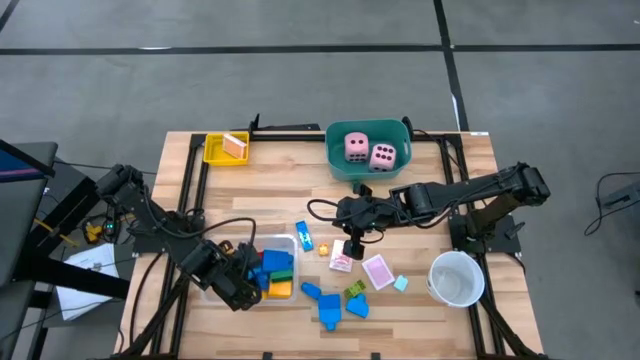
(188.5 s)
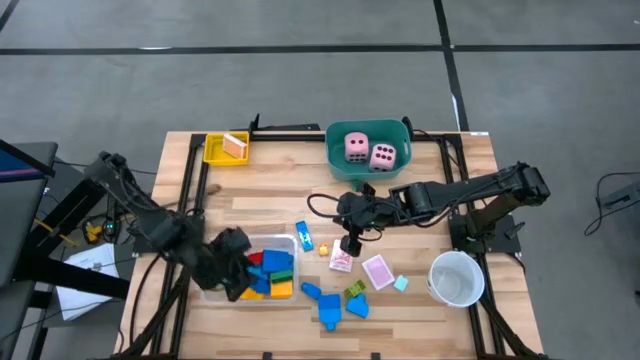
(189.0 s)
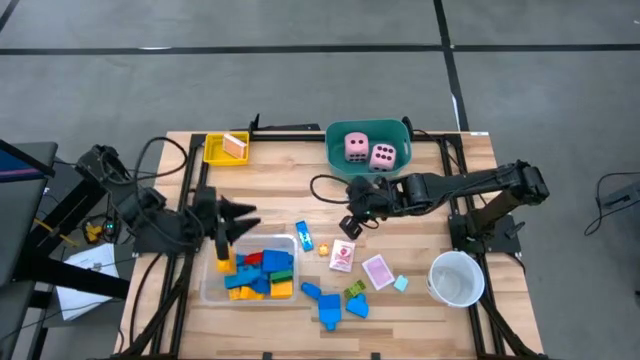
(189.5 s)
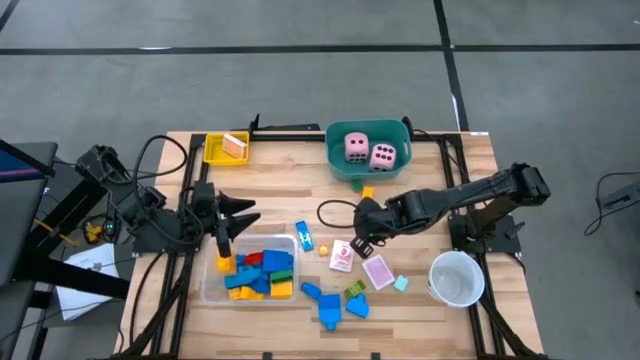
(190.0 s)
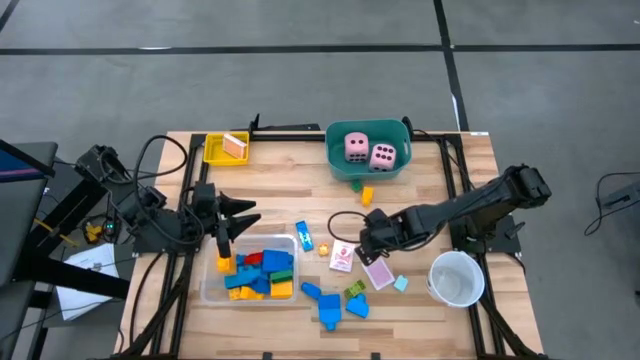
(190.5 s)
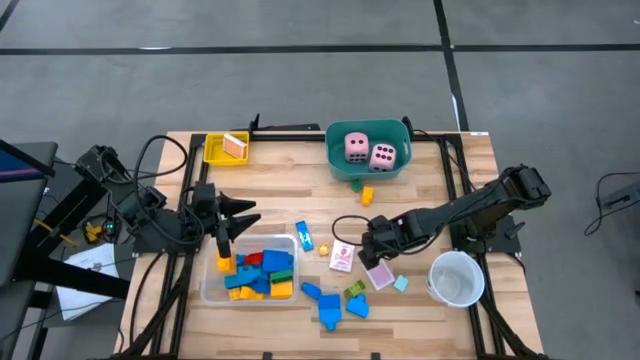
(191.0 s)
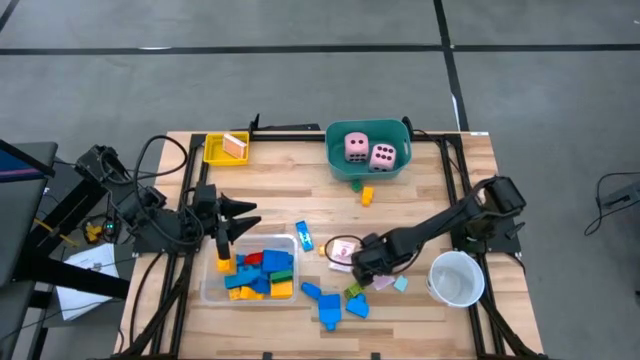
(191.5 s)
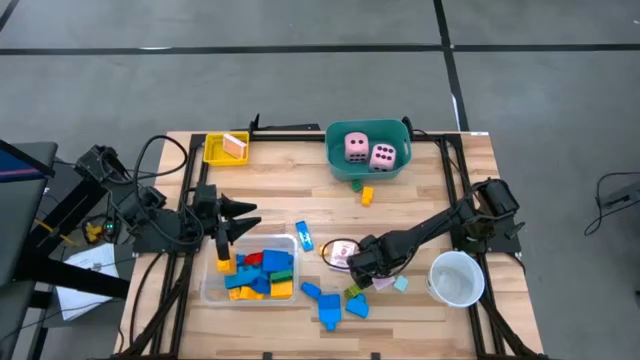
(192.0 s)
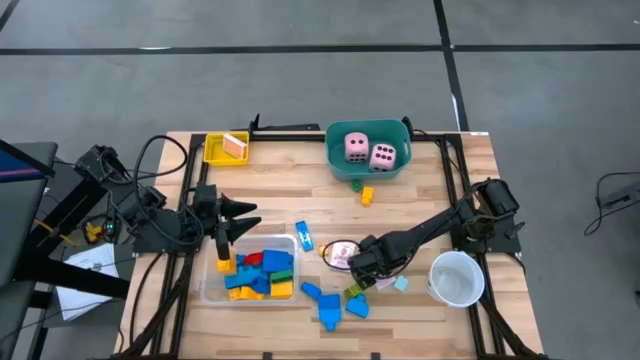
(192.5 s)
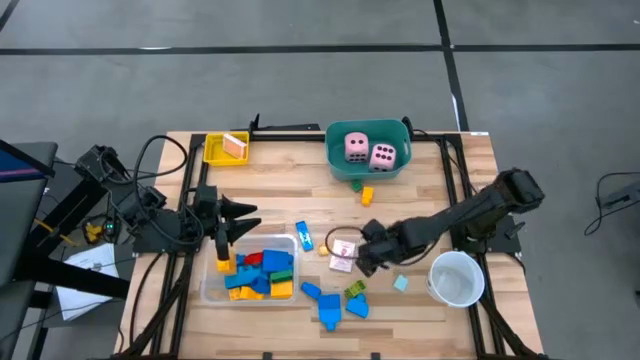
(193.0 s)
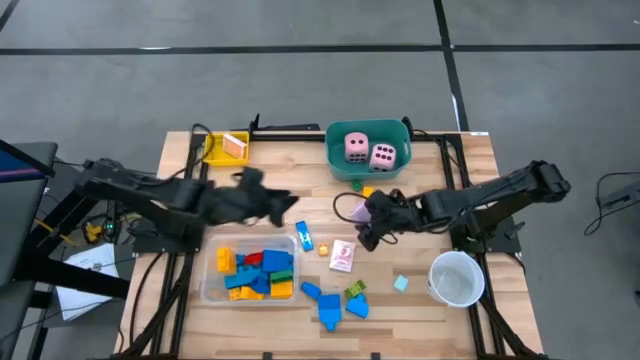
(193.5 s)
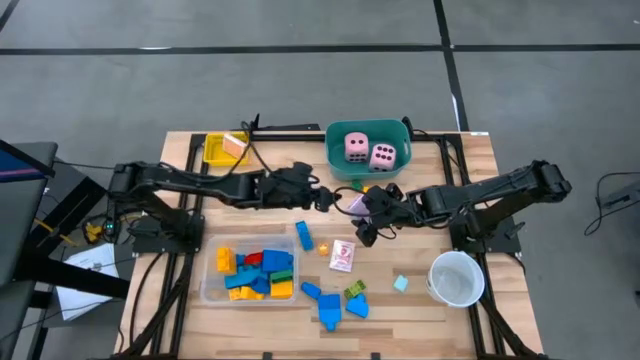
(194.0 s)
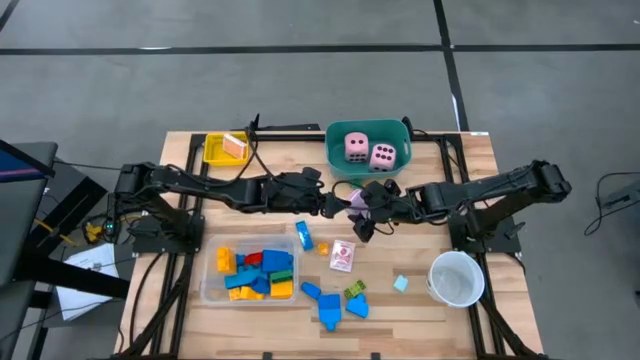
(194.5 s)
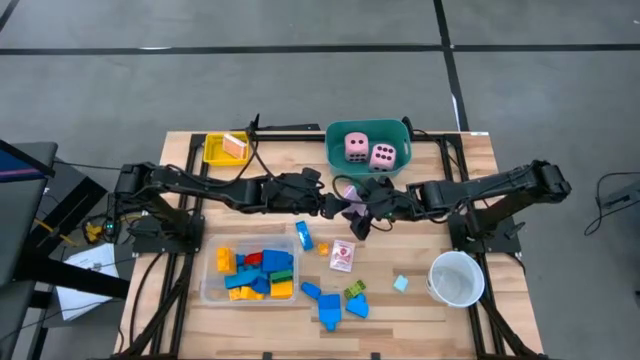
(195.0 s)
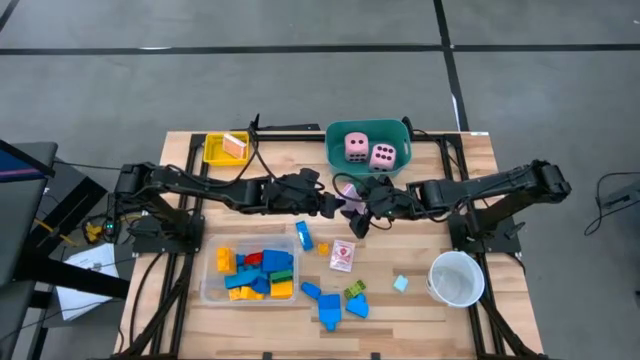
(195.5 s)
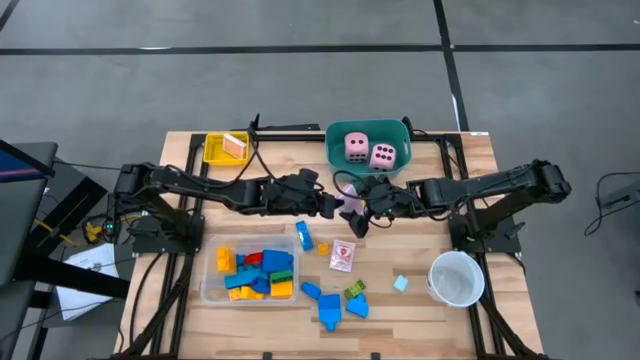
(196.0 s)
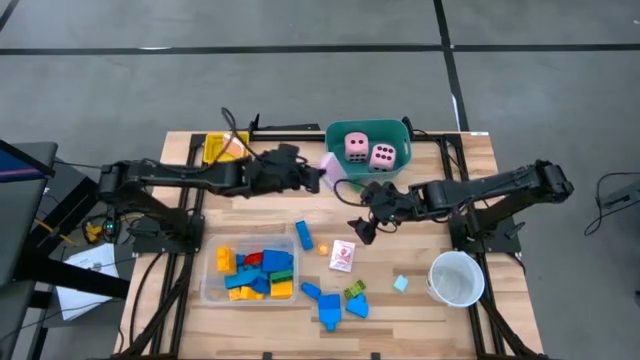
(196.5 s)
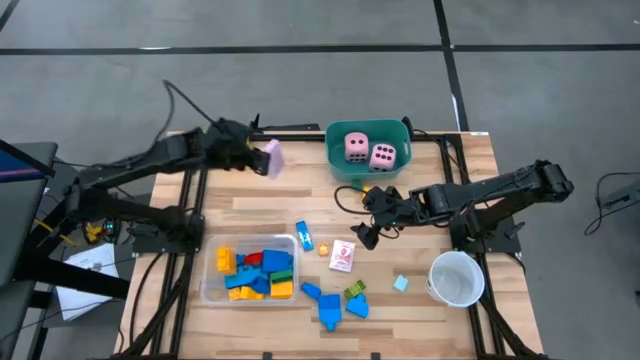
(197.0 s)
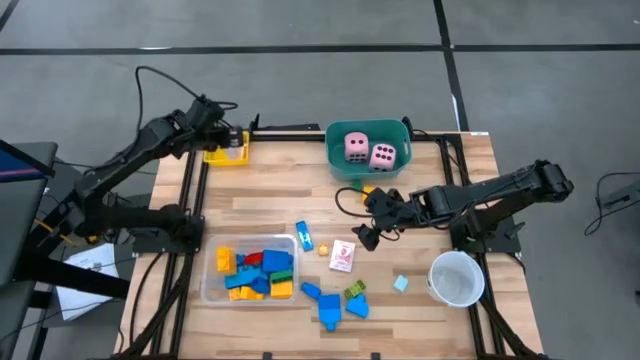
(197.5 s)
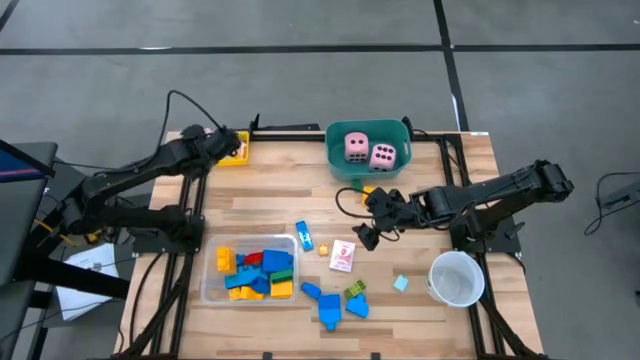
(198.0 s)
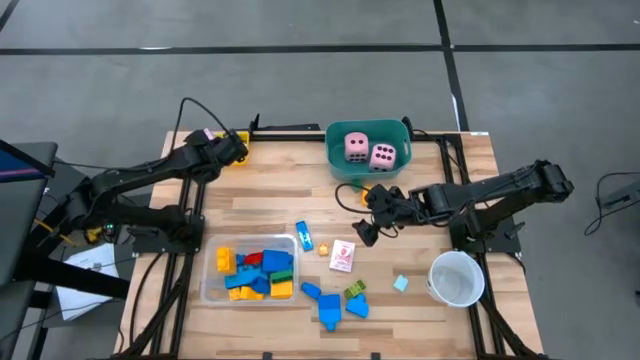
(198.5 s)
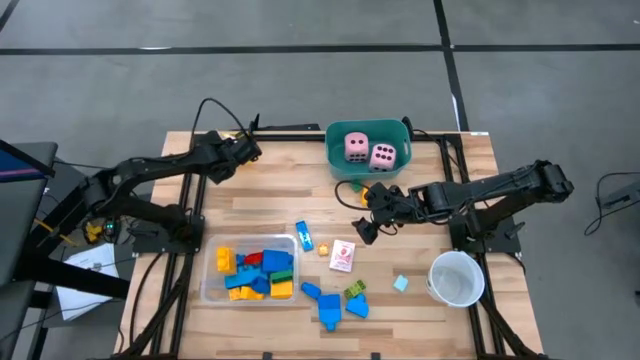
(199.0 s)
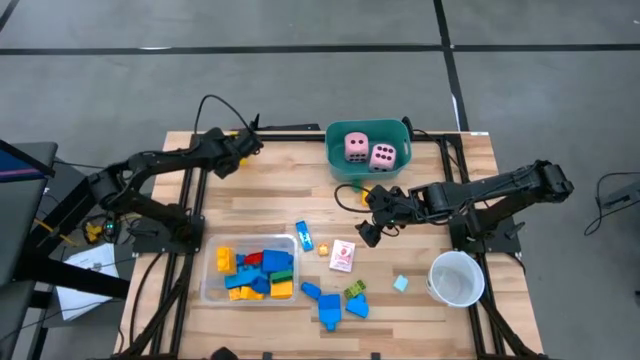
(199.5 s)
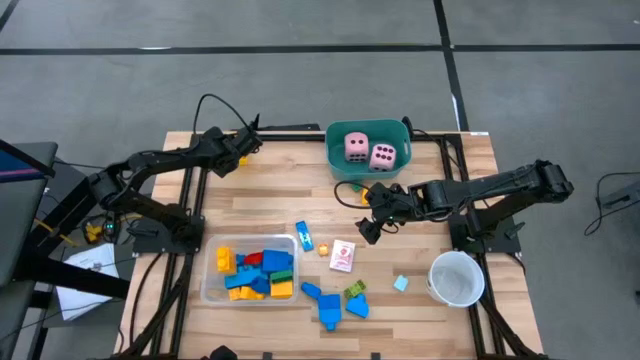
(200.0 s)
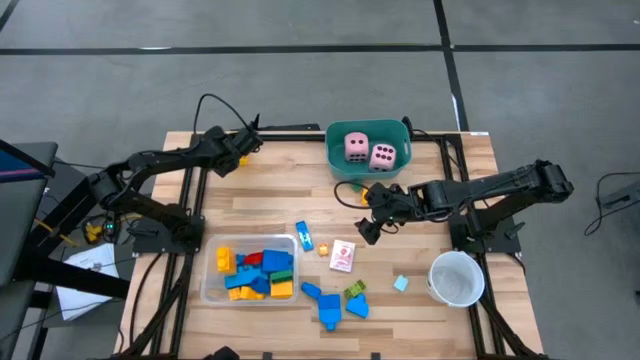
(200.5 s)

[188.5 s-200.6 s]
Task: Pick & Place Toys
Put the pink playing card into the yellow bin

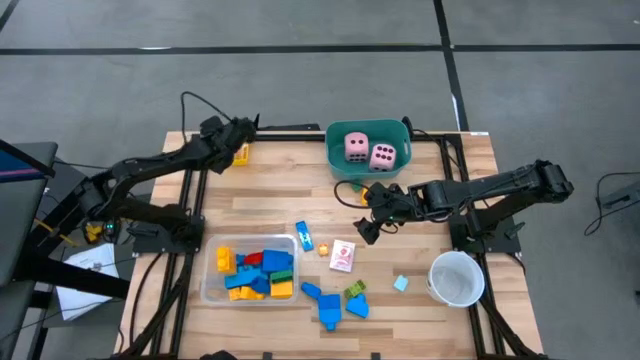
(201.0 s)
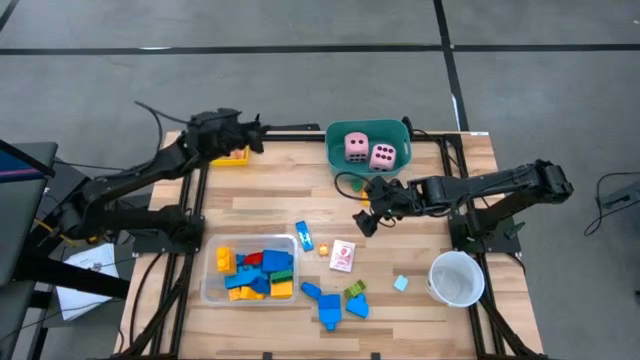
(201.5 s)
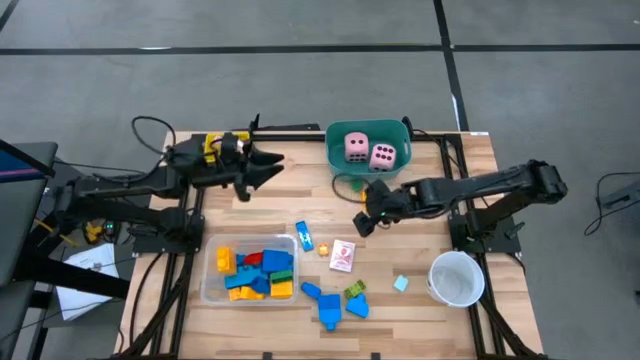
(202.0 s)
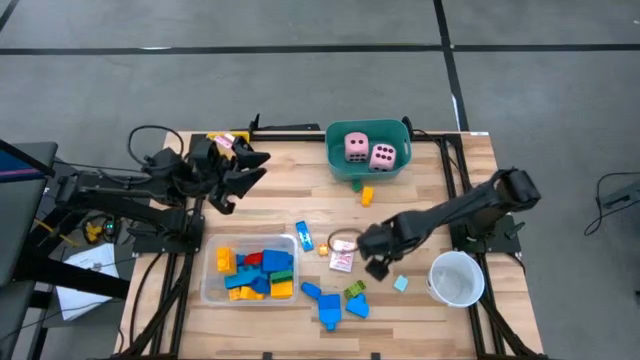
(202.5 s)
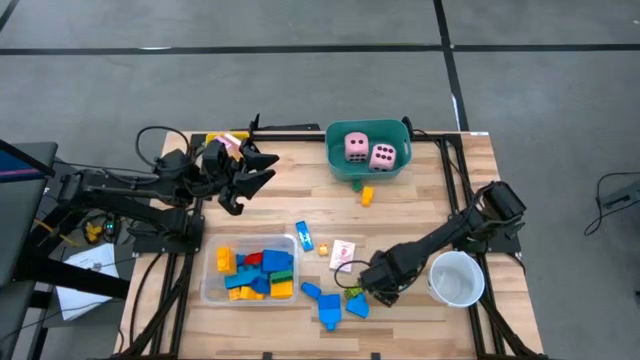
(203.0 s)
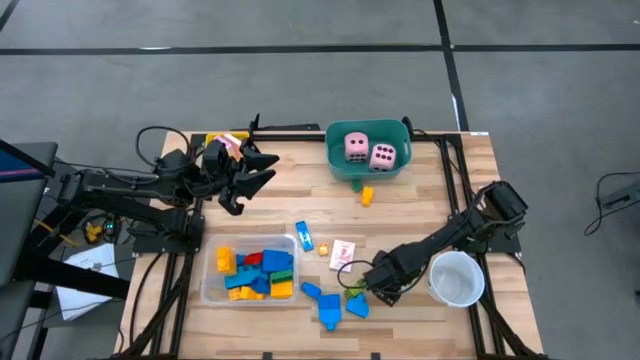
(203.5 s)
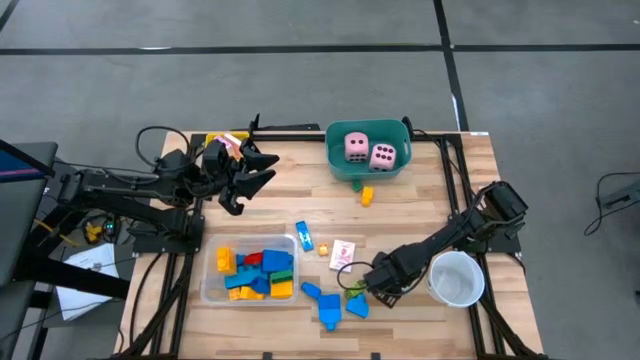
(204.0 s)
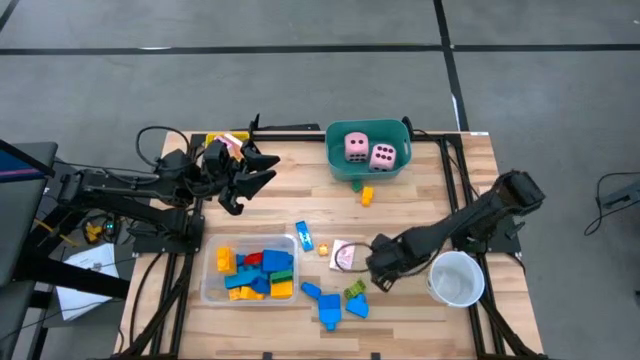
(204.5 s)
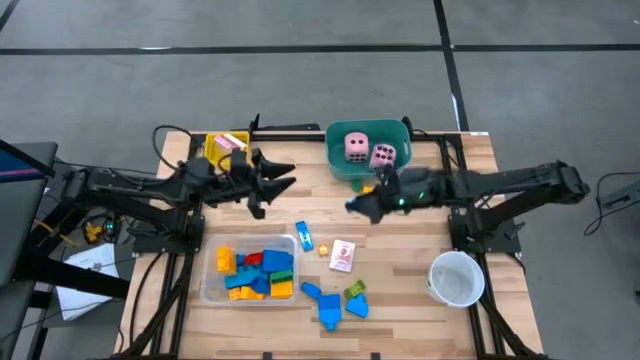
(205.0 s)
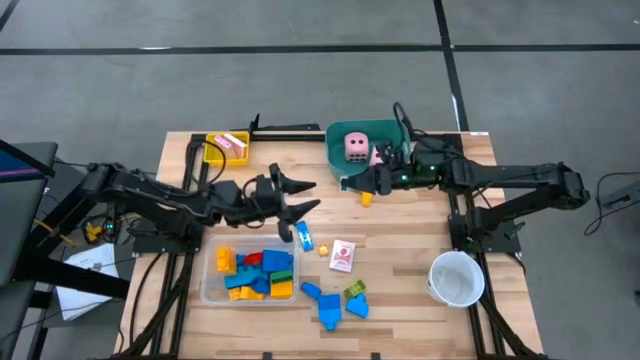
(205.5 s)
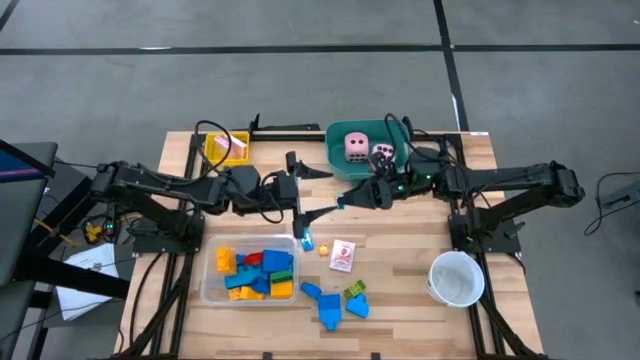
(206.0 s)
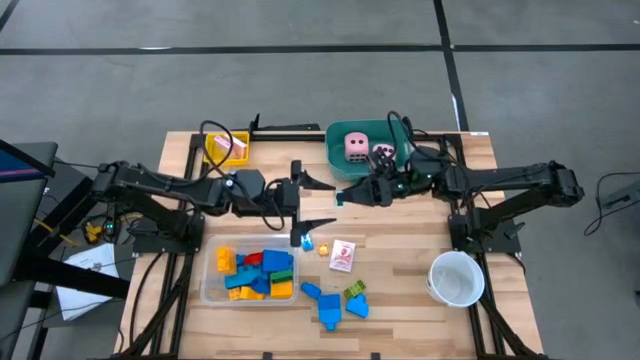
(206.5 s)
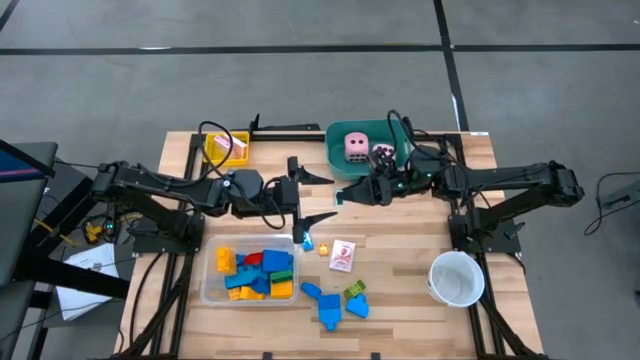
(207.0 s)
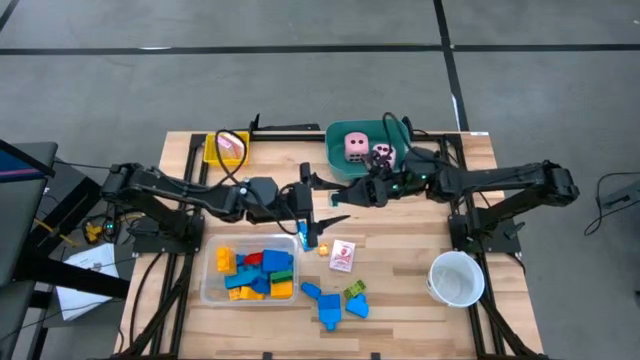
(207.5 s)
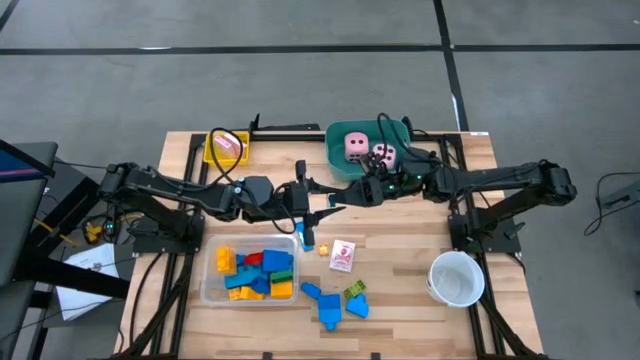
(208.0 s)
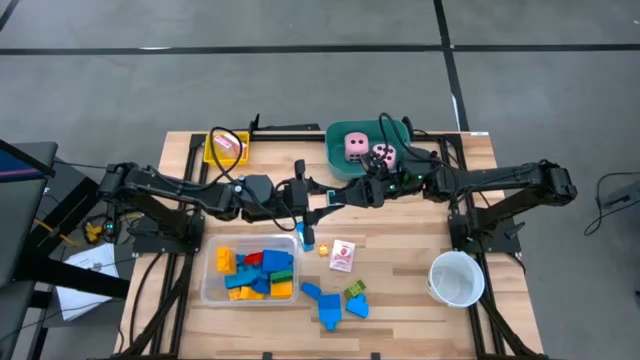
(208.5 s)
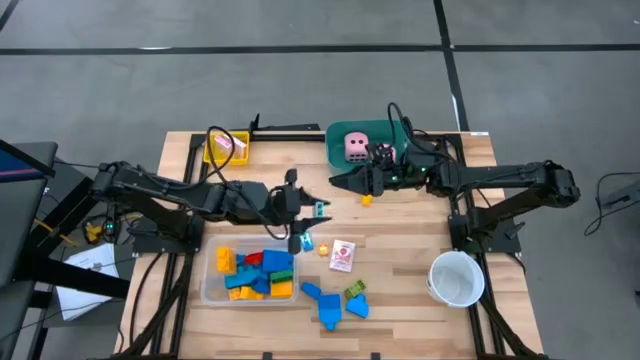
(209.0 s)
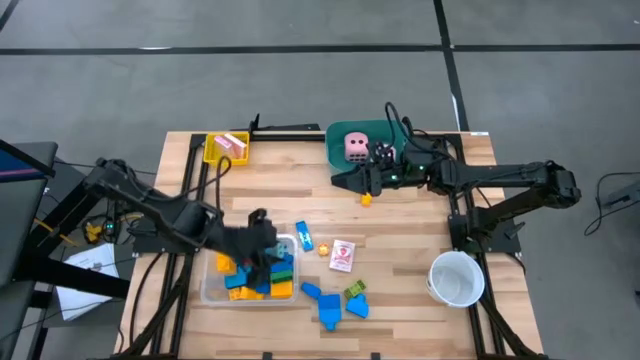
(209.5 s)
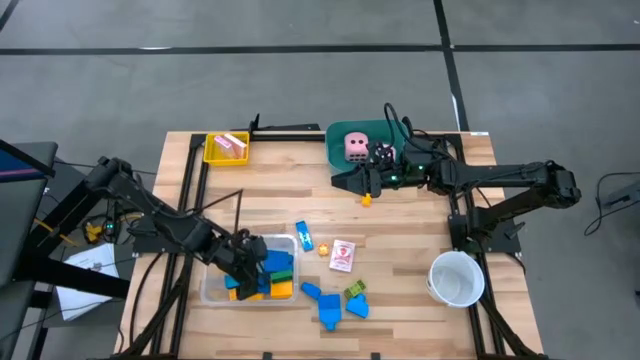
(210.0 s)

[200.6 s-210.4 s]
Put the light blue game piece into the transparent bin
